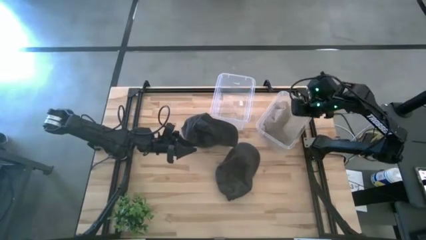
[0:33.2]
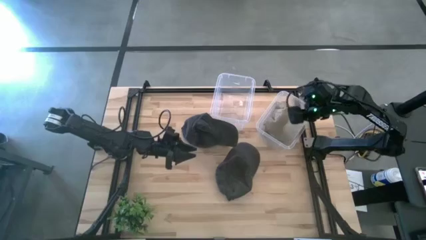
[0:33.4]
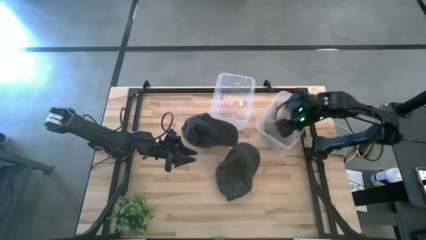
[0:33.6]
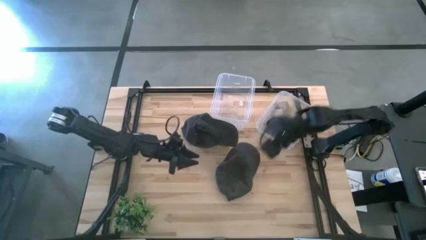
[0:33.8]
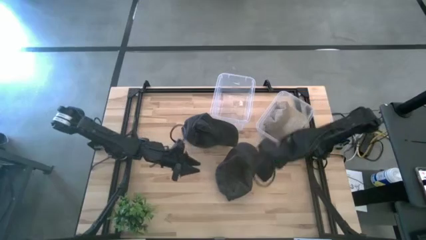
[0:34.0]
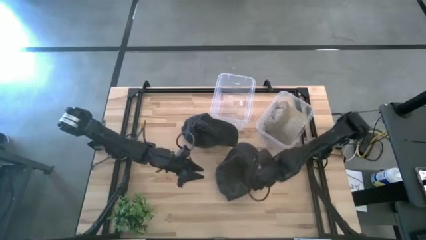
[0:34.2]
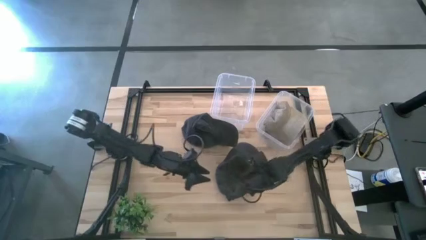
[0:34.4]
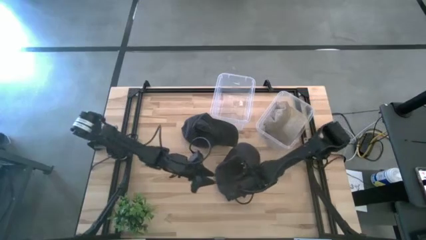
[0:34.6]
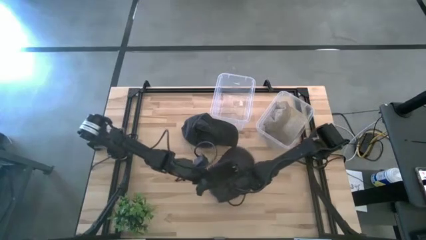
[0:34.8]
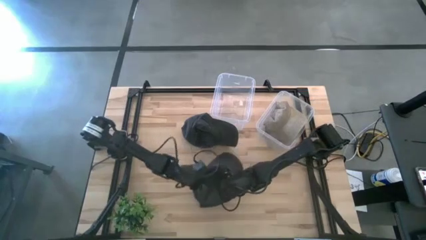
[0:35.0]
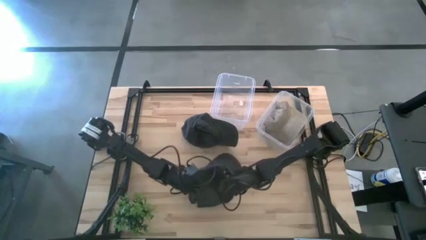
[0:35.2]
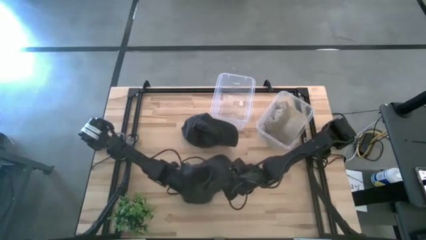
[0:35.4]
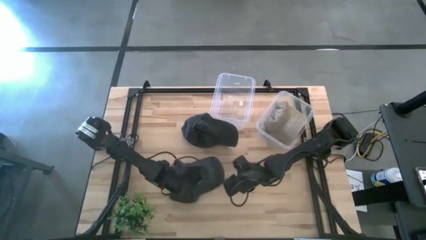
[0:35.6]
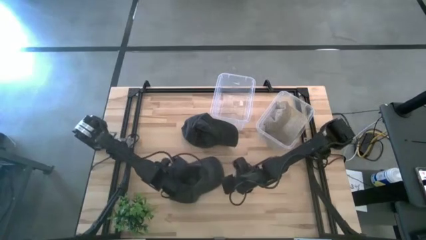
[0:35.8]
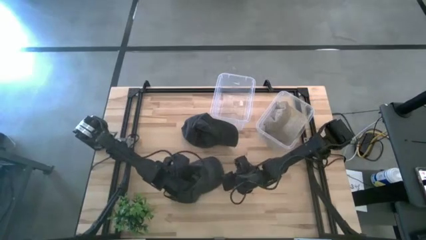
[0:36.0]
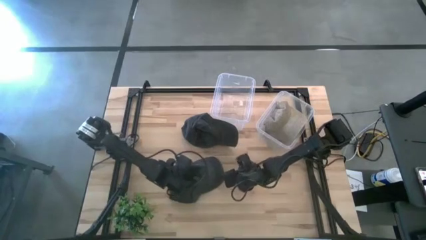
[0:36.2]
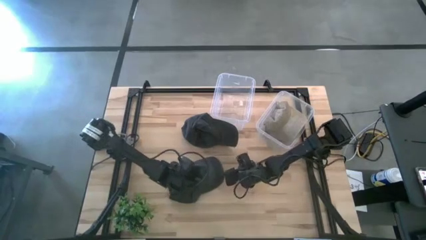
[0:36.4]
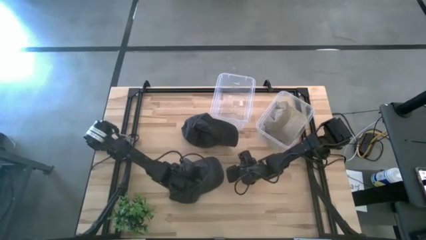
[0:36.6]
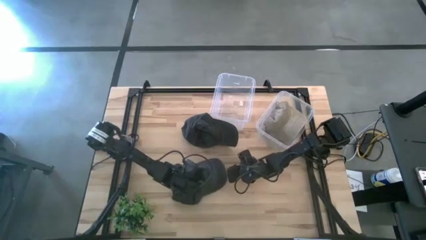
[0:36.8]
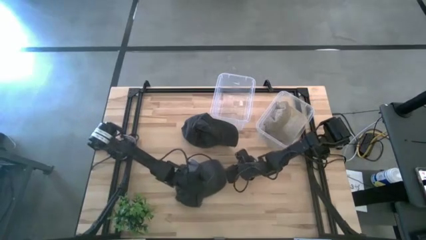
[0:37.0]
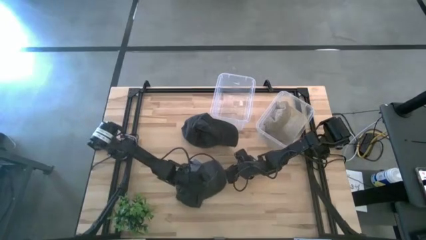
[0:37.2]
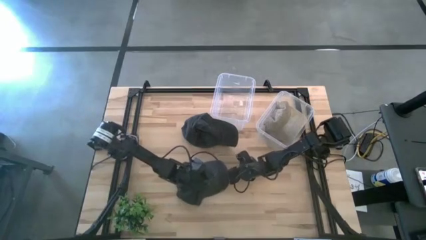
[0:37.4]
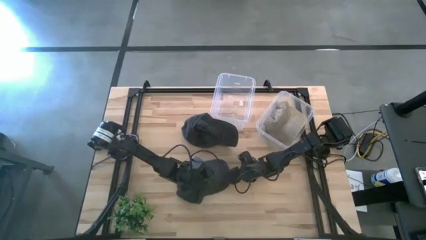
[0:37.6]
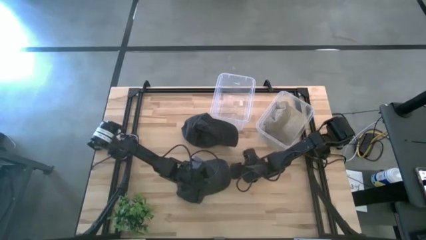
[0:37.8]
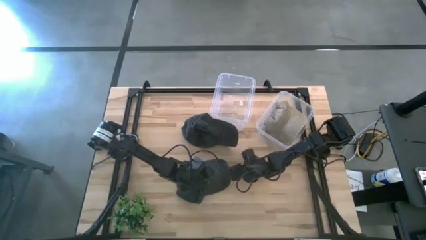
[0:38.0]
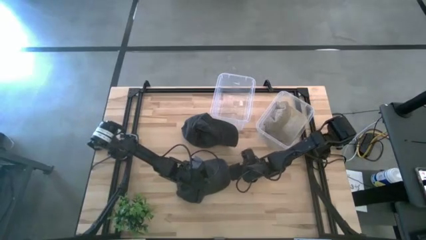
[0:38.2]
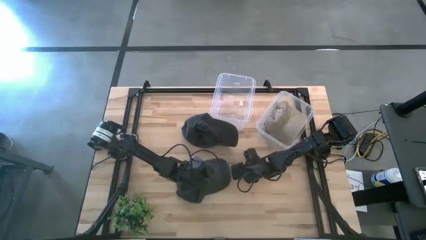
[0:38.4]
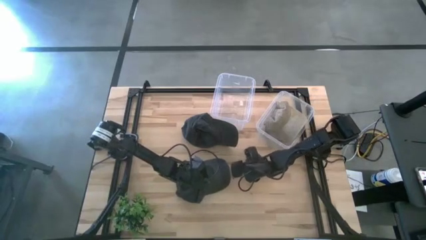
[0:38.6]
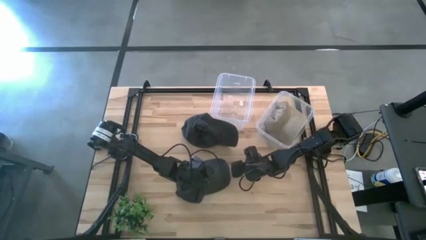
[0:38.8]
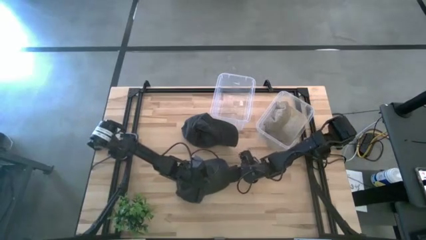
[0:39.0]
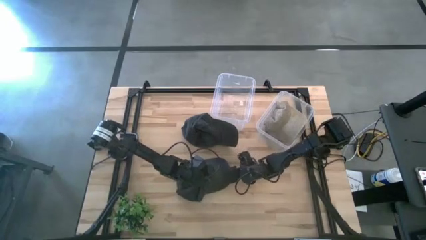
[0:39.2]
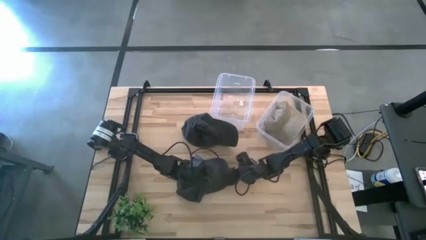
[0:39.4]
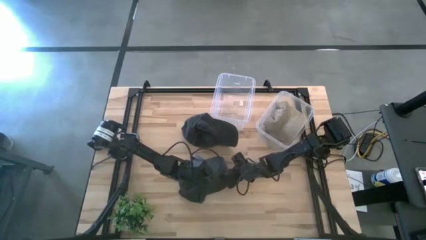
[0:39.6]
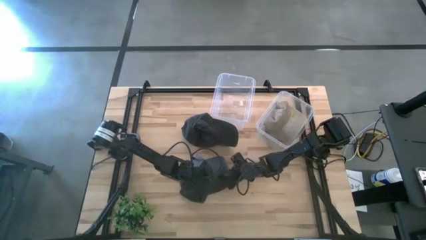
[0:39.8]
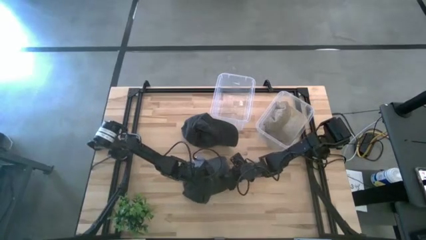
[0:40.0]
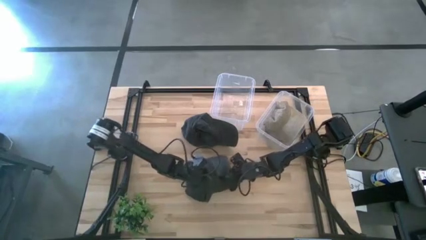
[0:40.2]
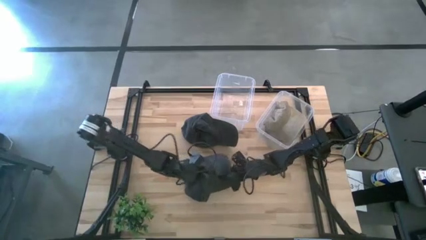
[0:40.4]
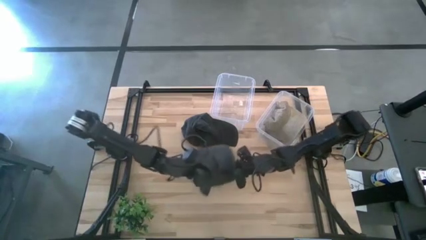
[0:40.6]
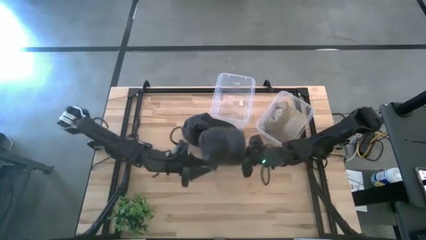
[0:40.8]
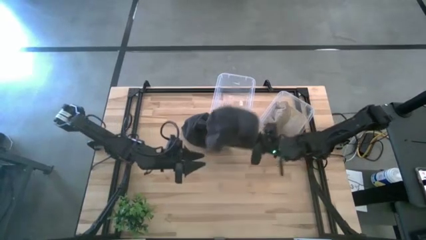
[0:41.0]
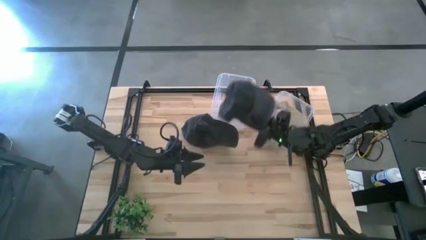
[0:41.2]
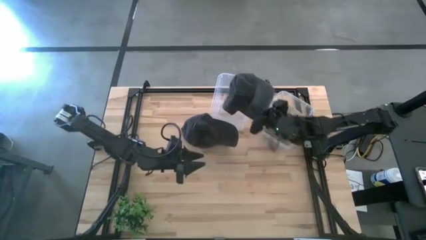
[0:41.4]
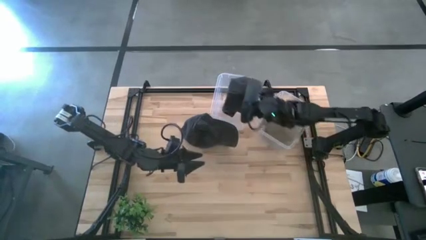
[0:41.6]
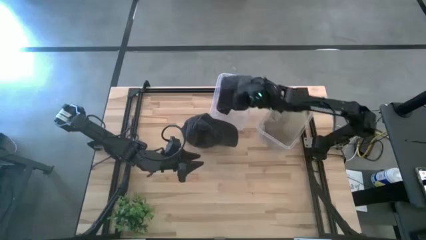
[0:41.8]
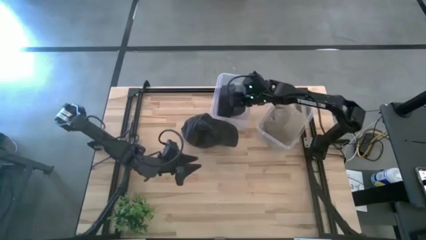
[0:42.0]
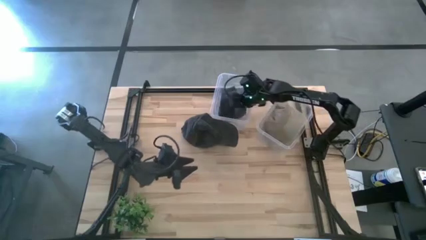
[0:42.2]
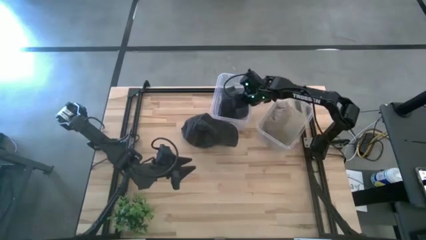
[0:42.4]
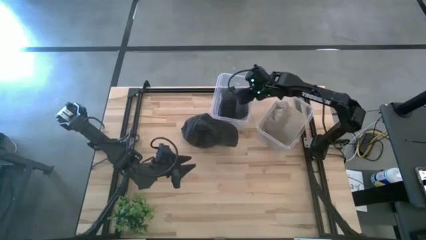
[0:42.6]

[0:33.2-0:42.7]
Task: Pick & Place hat
Put the bottom black cap into the left transparent bin

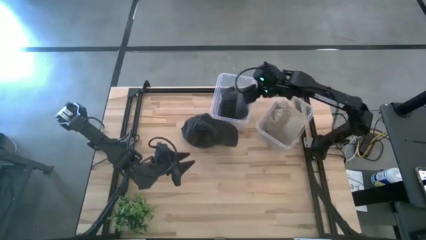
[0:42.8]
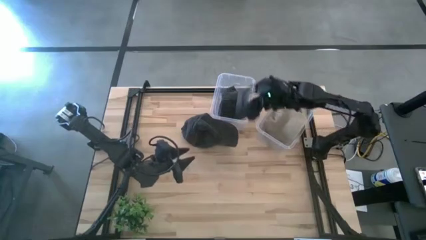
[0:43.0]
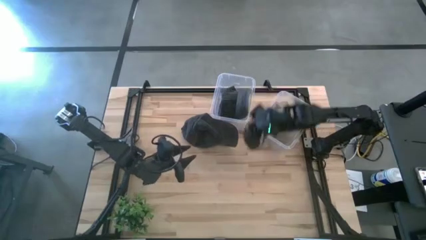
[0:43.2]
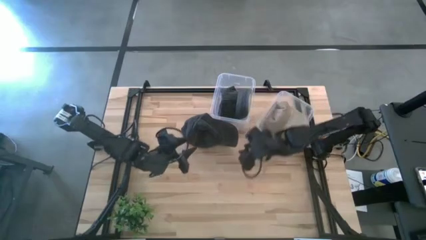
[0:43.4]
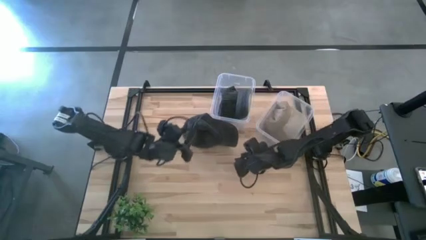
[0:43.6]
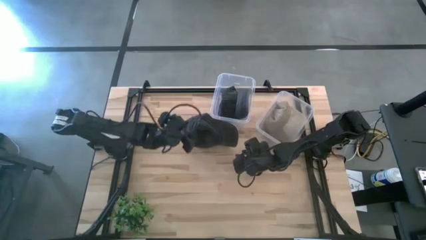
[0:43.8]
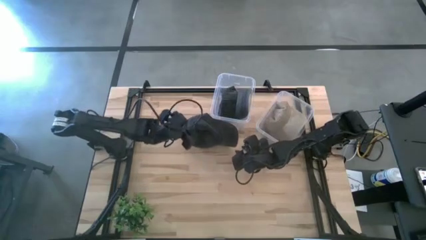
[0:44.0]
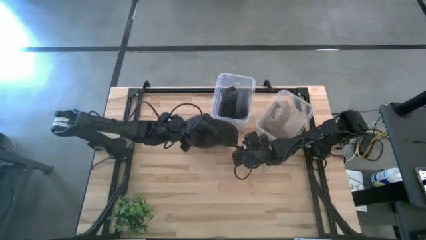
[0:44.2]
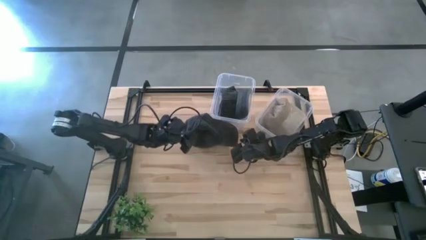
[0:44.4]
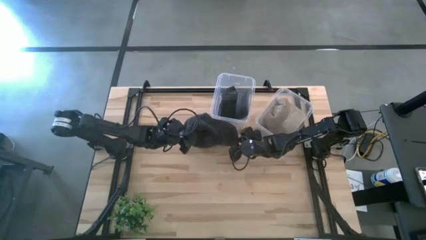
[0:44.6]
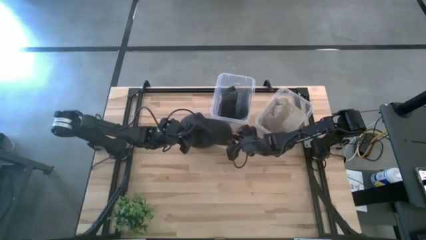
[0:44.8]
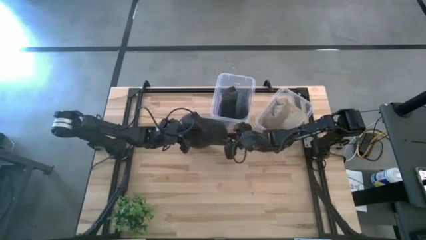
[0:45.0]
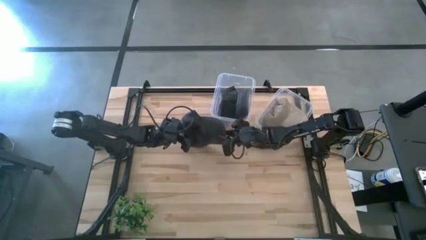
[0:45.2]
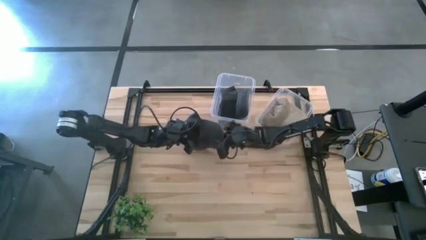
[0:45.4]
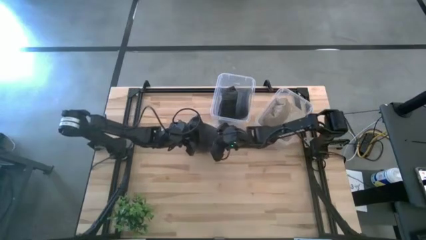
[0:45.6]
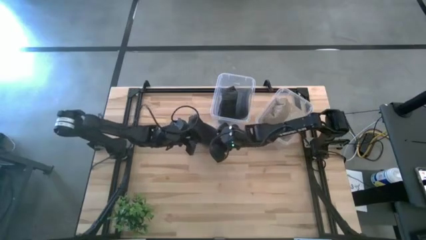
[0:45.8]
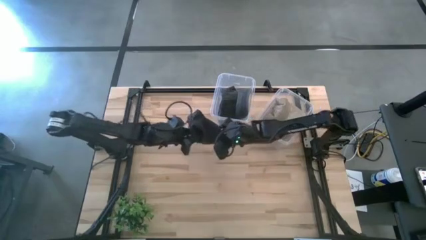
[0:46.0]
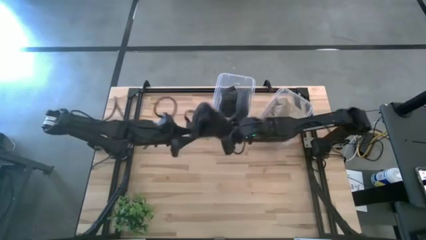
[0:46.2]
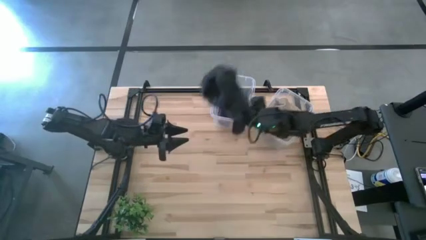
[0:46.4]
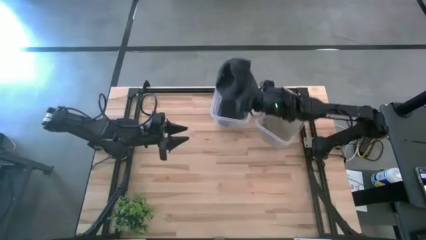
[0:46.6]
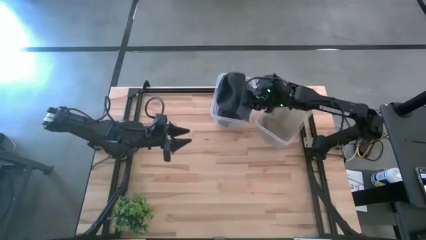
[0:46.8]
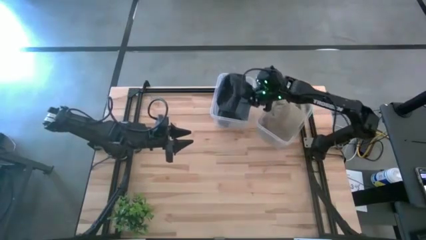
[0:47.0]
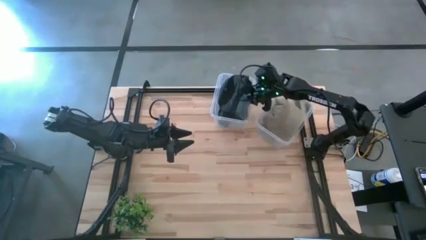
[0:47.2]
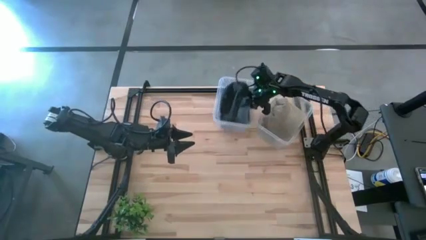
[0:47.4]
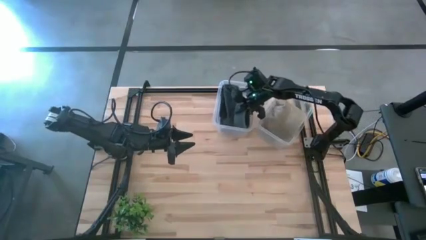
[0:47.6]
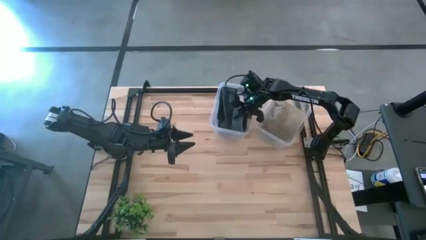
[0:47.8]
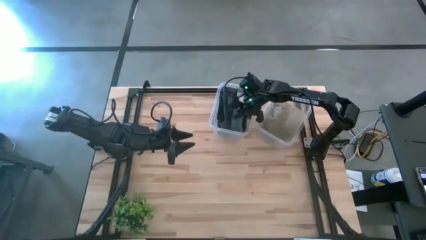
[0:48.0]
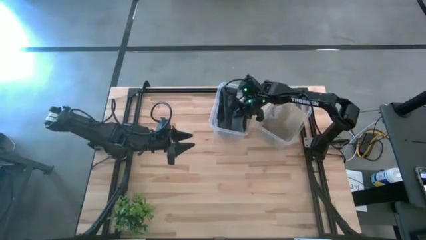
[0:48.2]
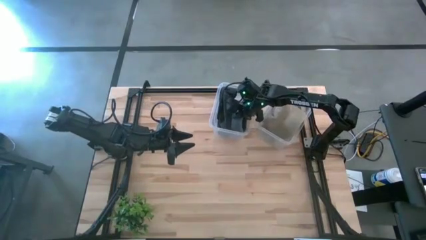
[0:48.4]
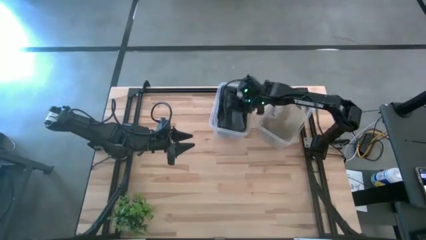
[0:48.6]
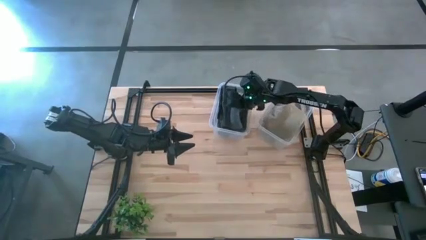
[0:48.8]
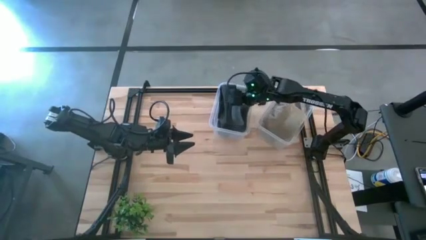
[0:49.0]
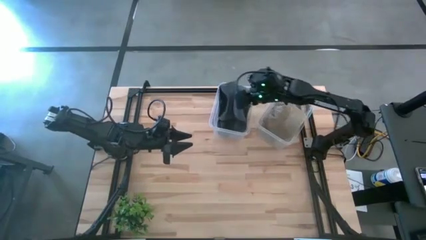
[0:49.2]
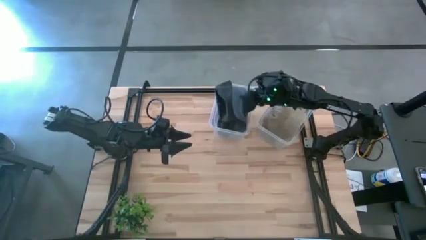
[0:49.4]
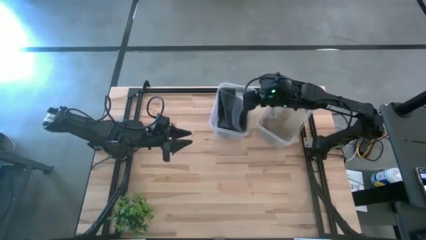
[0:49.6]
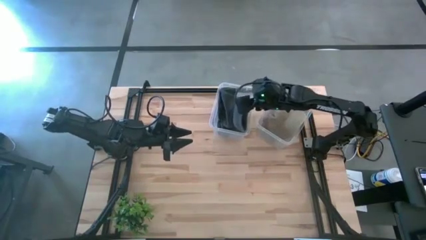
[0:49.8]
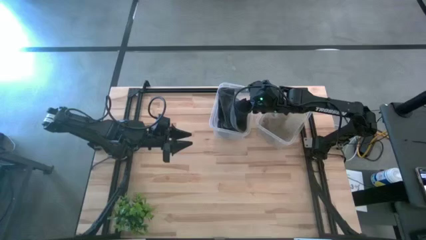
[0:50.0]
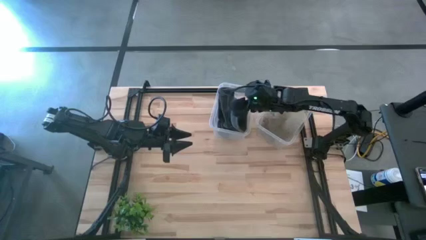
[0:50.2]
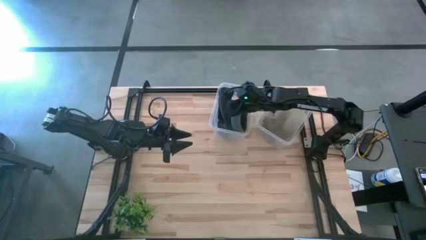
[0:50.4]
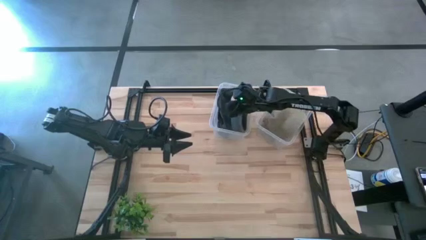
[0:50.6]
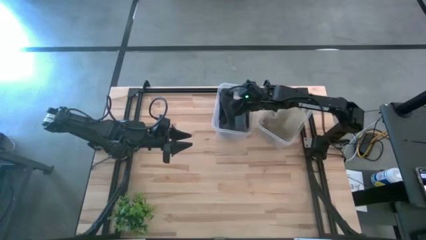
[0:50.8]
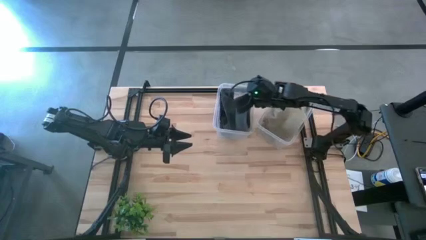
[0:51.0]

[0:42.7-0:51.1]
Put the black cap into the left transparent bin
